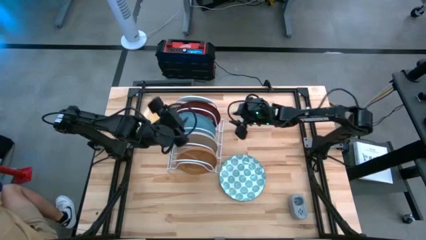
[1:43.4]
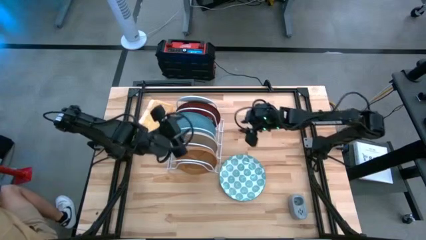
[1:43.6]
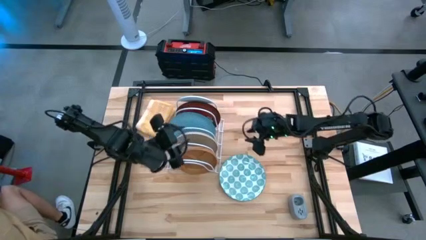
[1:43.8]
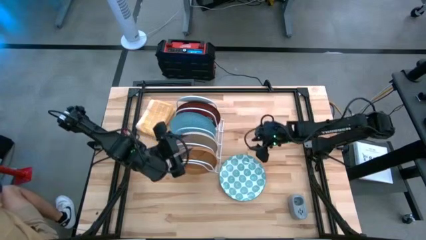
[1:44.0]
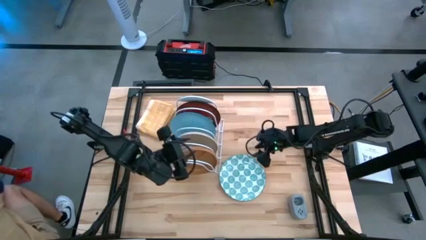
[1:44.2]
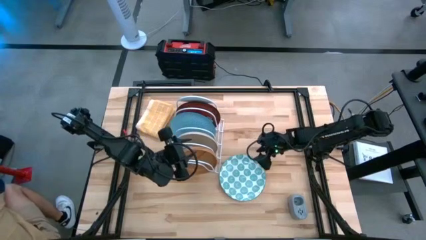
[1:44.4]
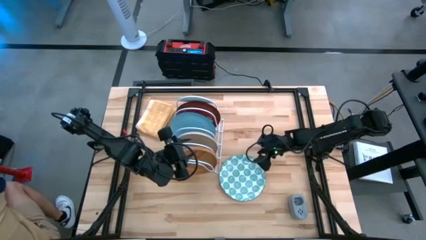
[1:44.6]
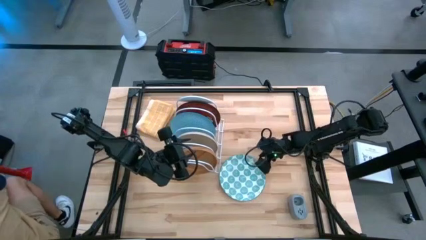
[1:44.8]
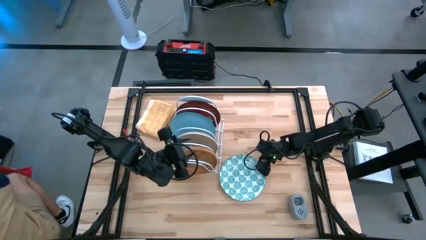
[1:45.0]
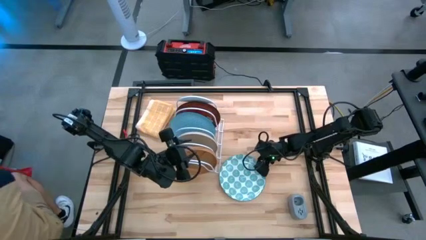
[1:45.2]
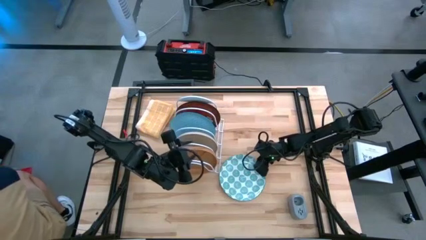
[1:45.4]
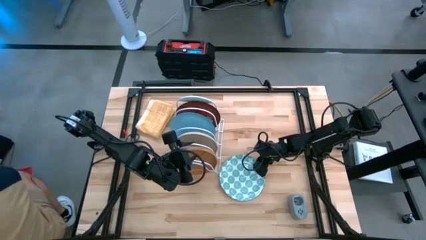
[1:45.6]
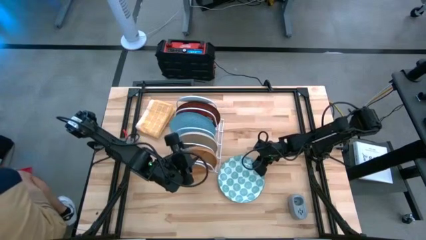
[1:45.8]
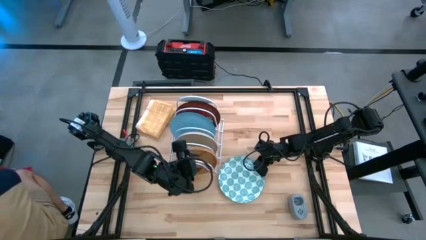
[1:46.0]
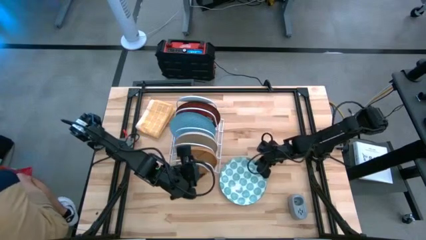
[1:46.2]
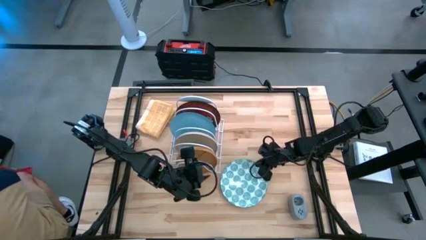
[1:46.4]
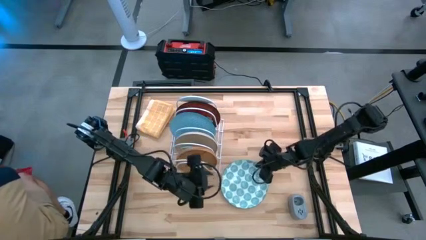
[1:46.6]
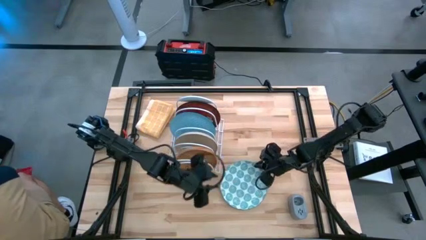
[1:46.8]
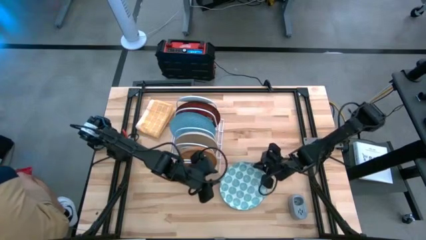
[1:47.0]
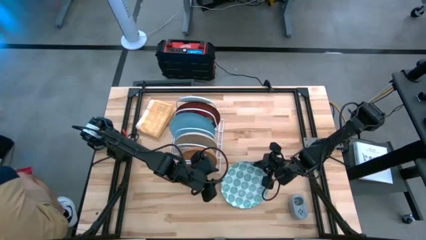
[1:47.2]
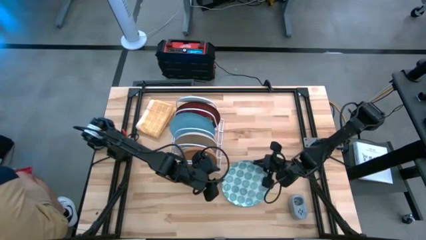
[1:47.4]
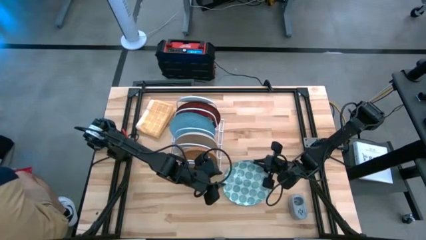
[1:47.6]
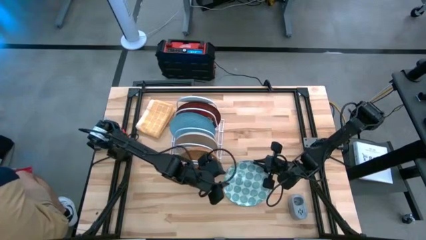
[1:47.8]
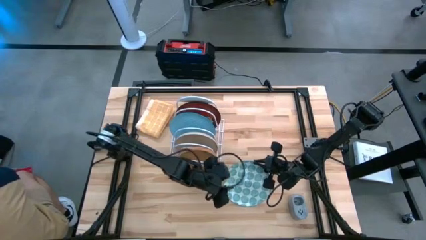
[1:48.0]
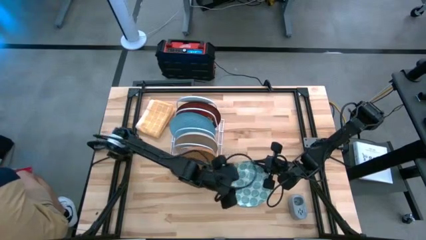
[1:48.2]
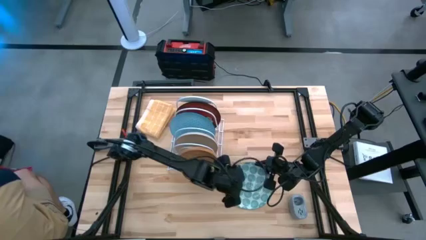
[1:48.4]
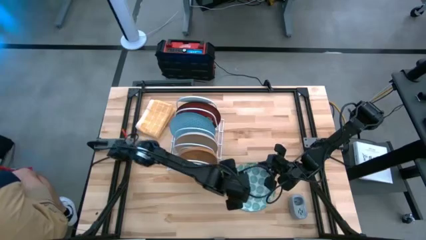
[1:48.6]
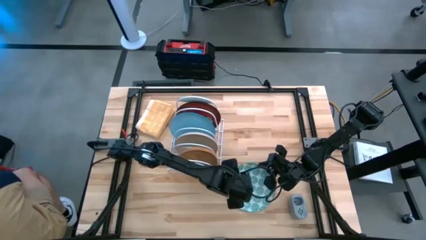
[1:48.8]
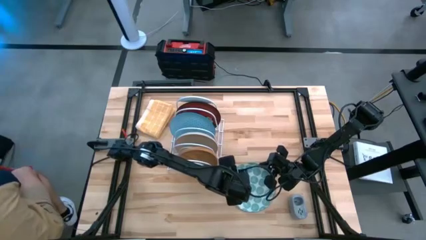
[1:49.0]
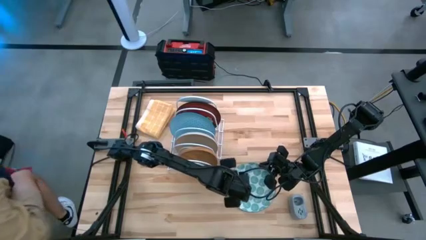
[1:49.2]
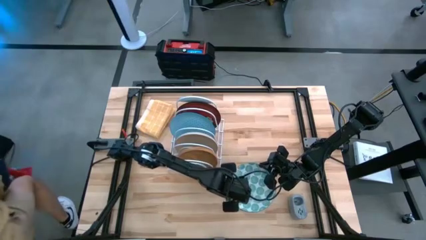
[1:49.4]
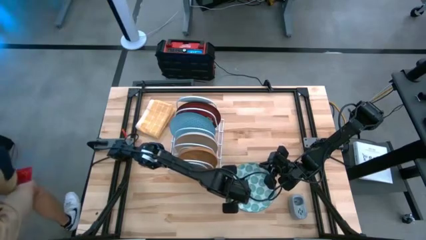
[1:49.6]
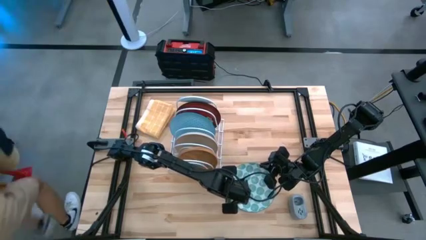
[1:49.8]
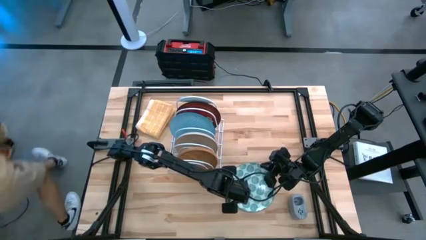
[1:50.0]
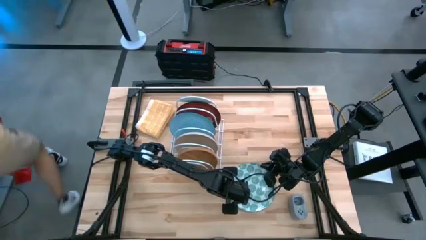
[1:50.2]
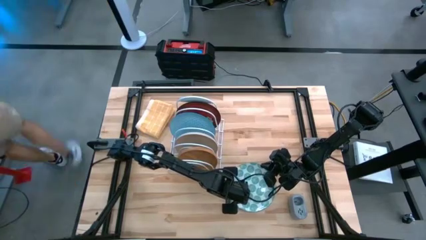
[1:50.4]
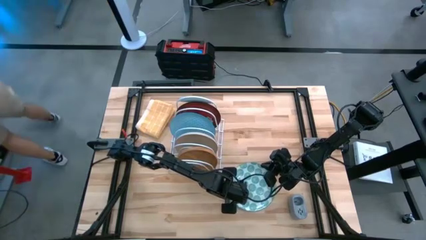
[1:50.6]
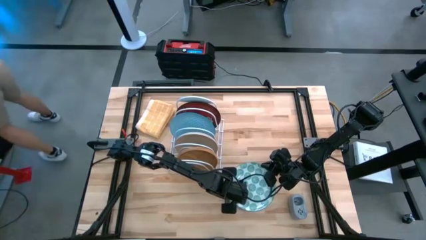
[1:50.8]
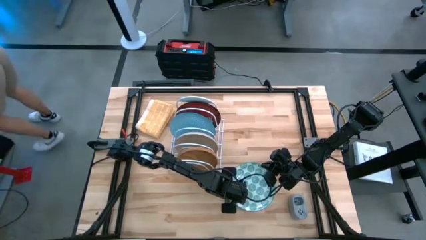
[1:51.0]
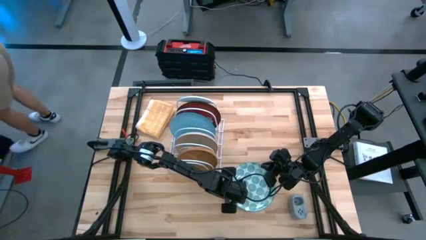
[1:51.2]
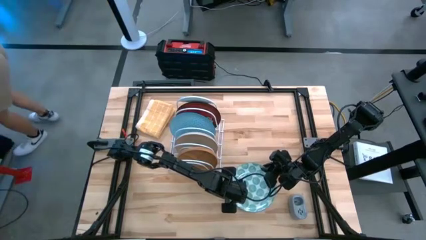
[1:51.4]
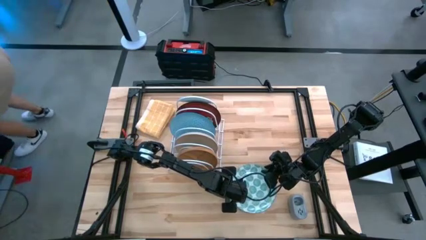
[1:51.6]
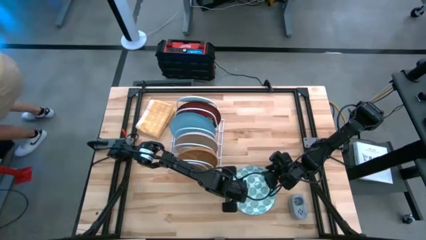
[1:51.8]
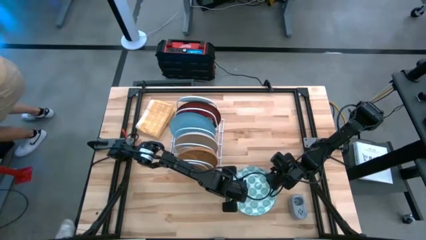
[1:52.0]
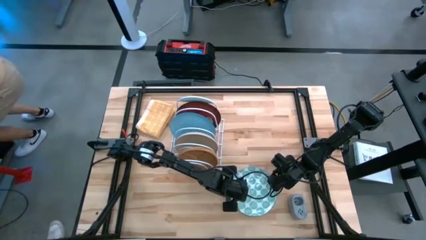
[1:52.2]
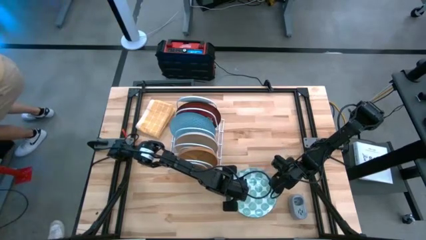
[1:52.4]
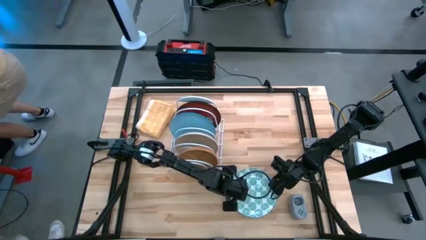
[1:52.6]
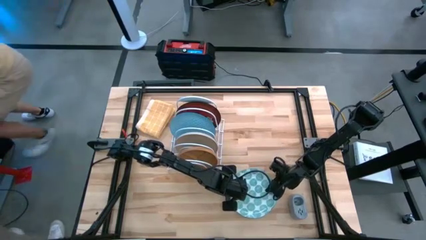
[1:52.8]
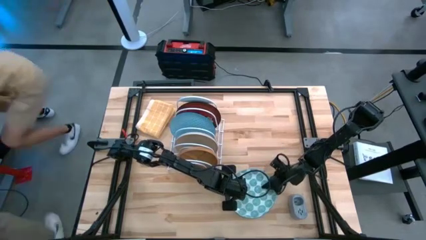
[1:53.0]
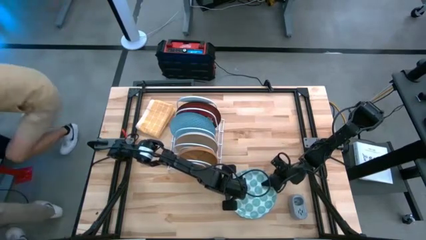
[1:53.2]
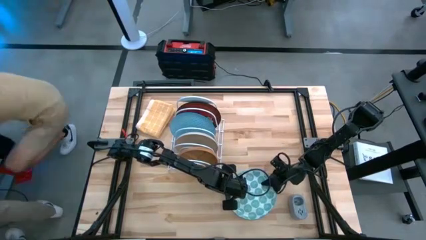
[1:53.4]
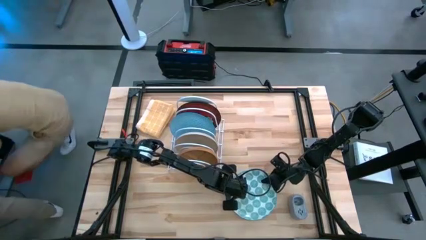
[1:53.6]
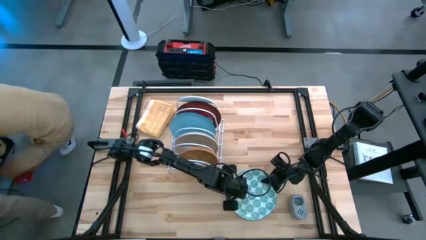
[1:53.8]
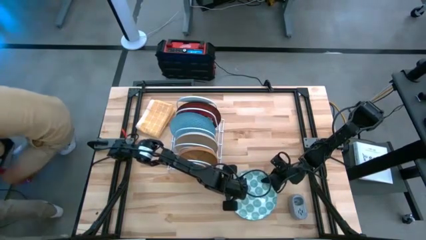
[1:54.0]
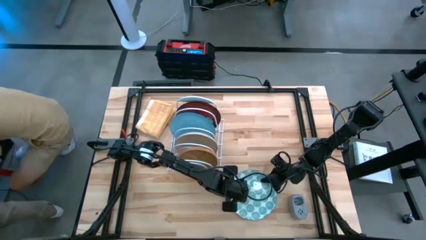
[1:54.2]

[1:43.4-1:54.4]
Task: Sort dishes
Put the green plate into the dishwasher rack

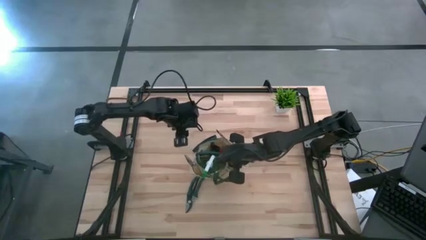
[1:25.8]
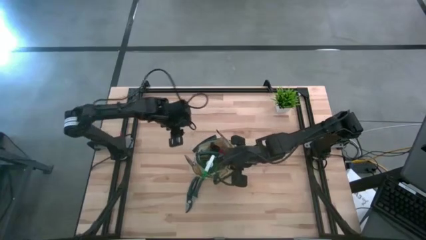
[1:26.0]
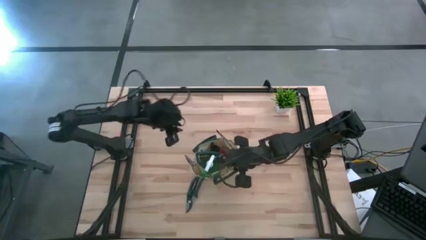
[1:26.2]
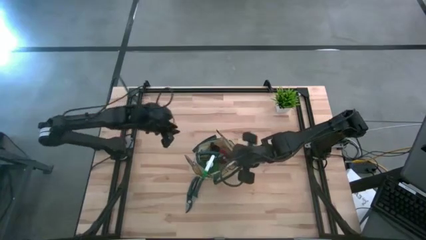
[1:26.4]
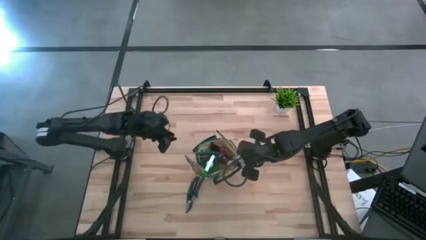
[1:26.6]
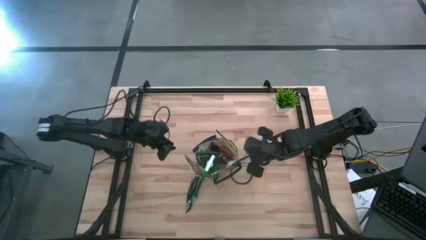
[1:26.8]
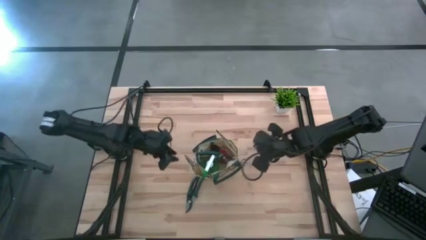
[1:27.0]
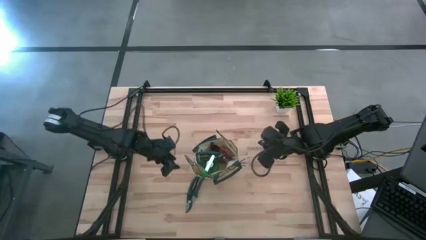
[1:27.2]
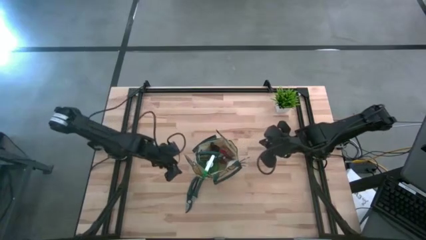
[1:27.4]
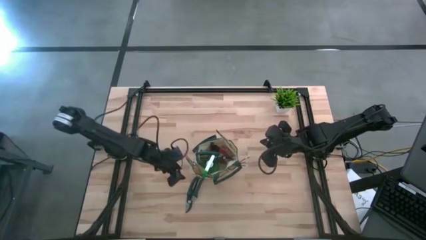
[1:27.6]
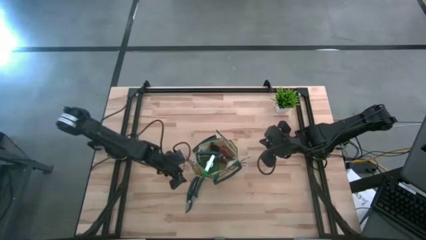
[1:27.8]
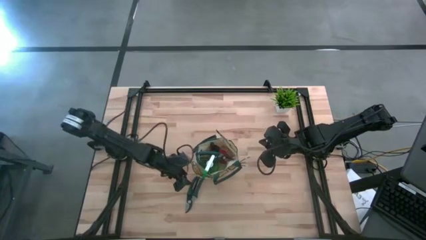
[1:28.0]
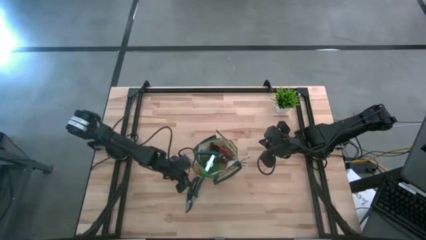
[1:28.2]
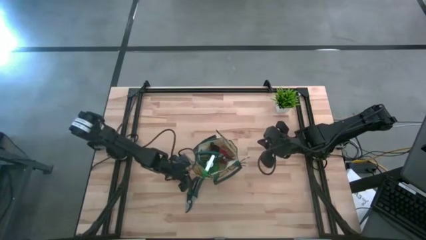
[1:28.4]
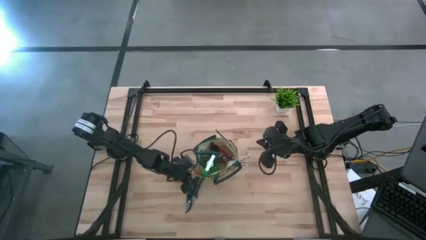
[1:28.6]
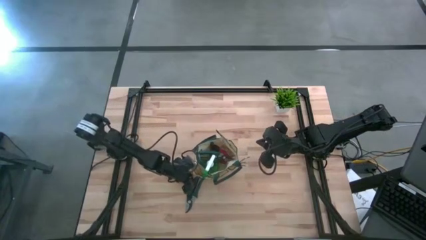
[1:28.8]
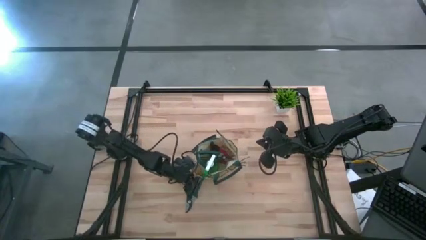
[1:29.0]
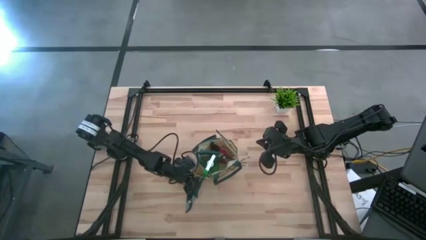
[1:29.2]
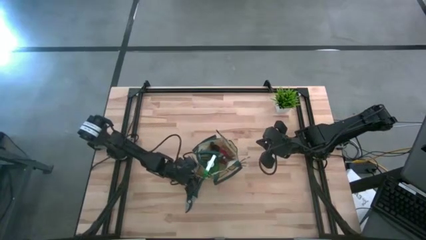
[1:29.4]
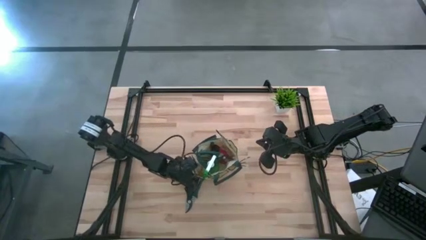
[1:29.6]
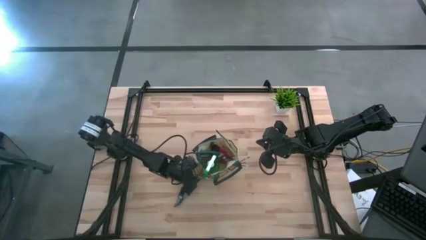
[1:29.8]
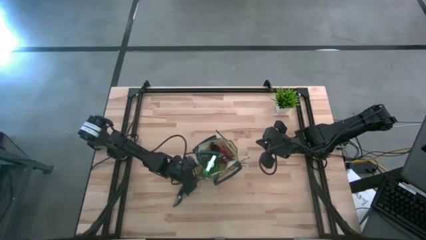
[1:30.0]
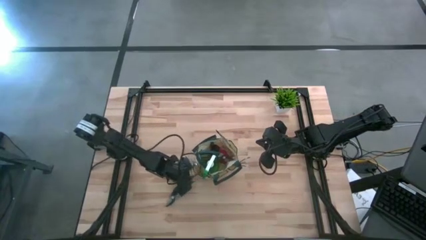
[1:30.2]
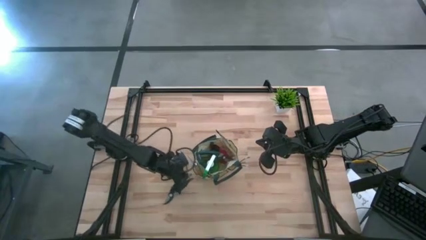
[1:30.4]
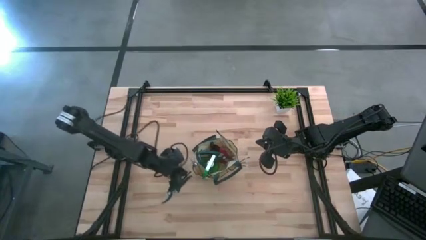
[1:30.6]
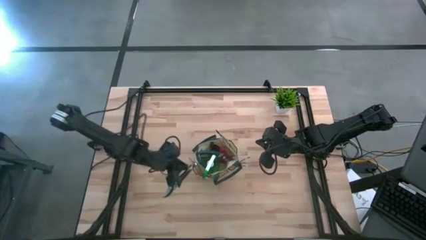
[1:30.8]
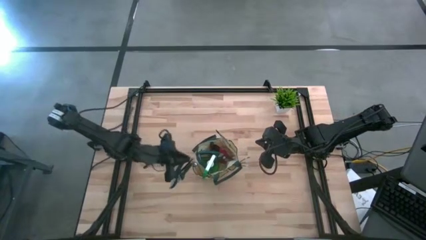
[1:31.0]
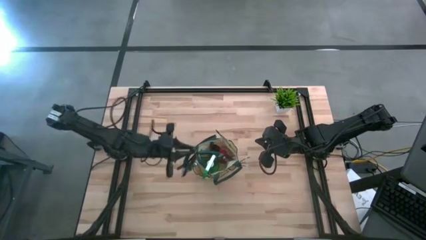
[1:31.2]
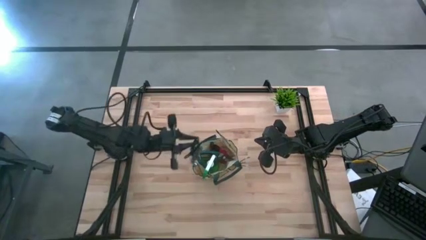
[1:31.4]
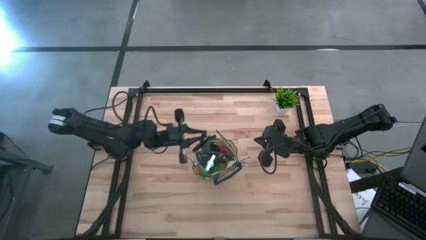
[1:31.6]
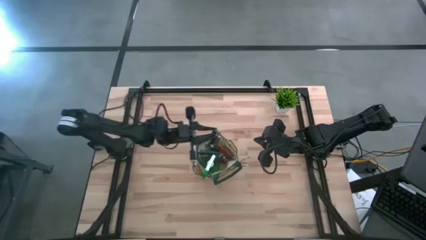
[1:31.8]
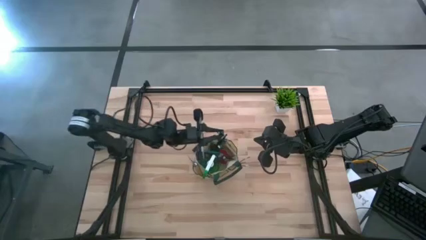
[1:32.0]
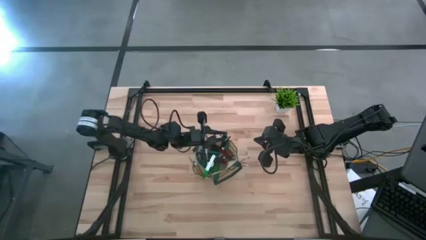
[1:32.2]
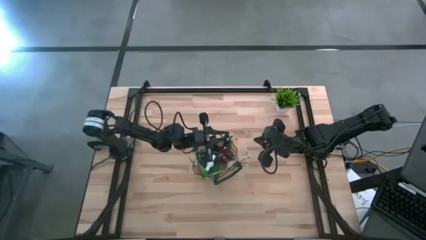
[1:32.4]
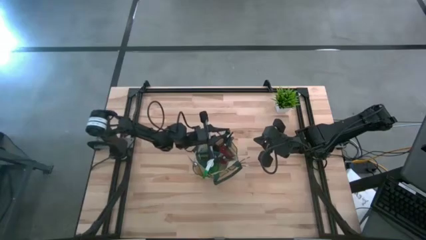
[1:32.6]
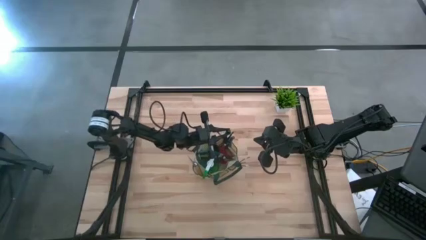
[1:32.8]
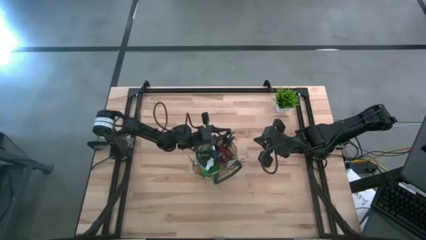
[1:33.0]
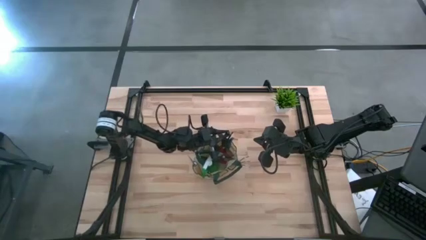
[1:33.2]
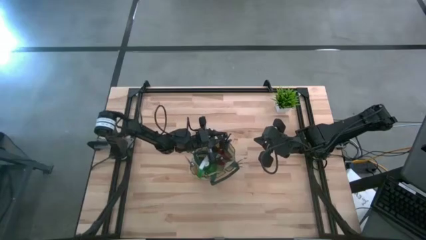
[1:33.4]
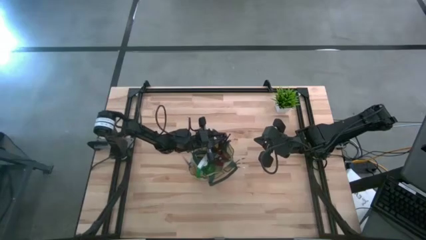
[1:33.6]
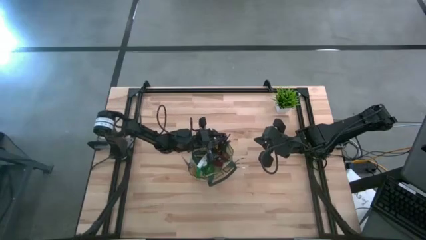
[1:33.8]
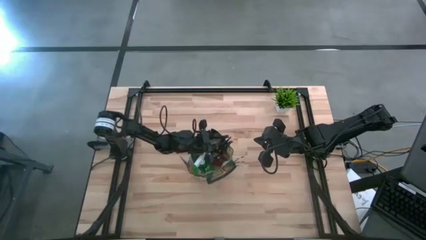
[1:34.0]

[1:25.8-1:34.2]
Task: Pick & Place Garden tools in Gardening bag
Put the green fruit pruner into the white gardening bag
